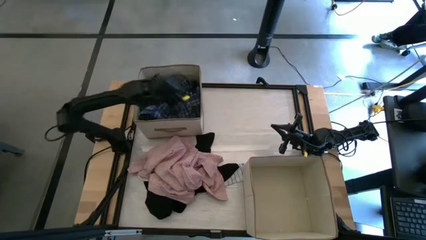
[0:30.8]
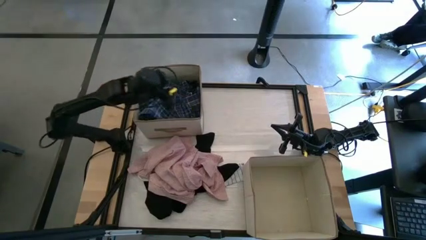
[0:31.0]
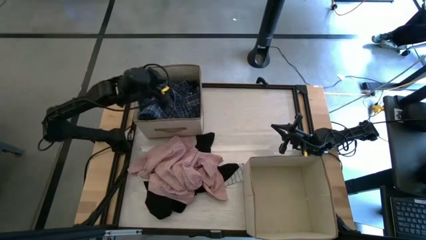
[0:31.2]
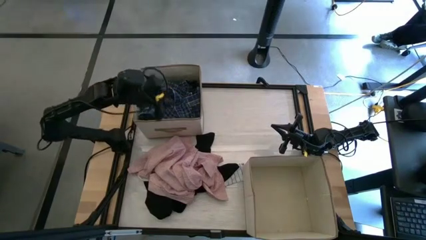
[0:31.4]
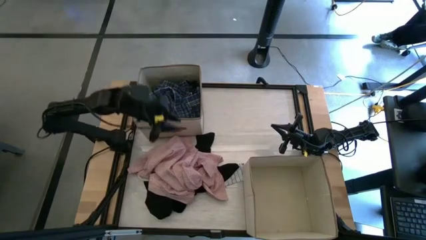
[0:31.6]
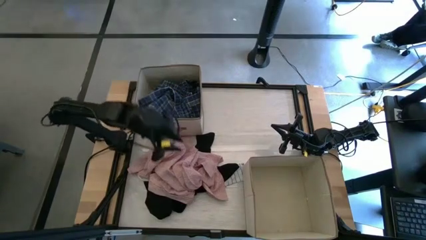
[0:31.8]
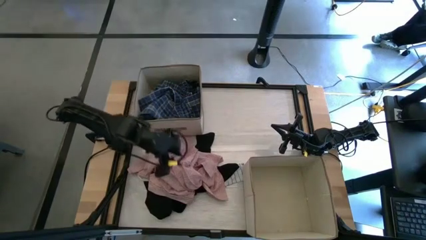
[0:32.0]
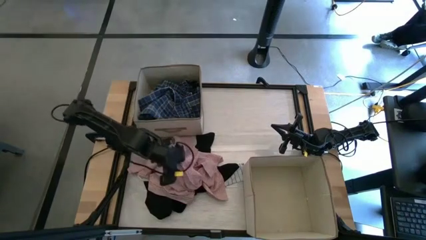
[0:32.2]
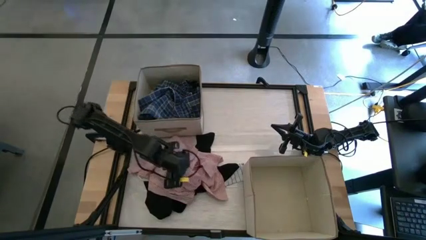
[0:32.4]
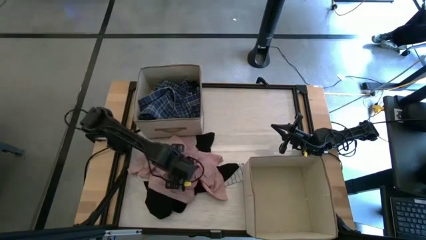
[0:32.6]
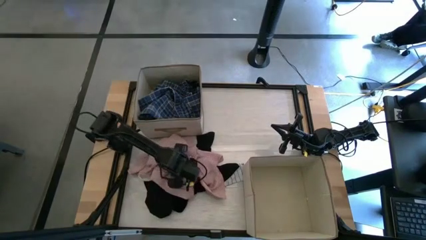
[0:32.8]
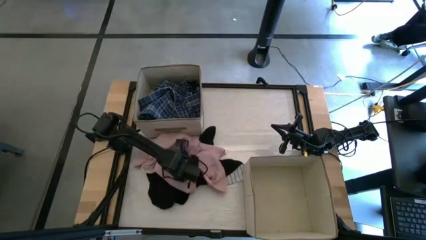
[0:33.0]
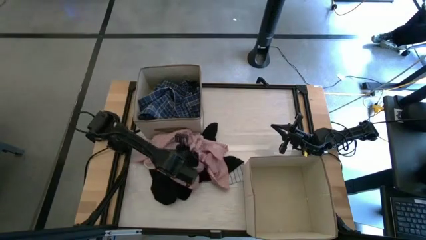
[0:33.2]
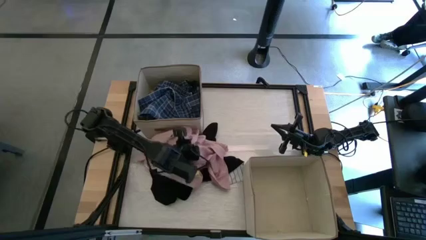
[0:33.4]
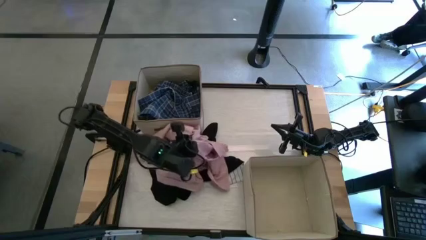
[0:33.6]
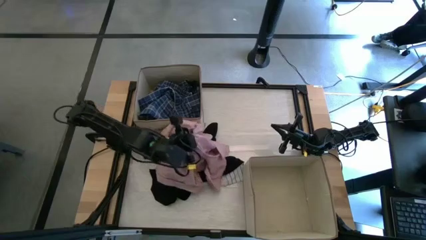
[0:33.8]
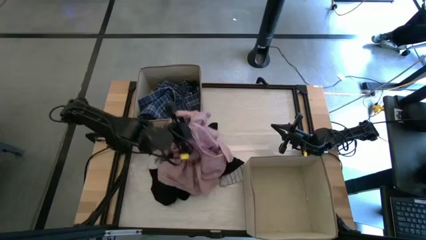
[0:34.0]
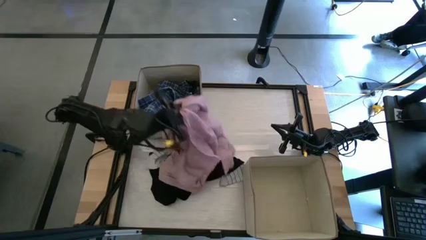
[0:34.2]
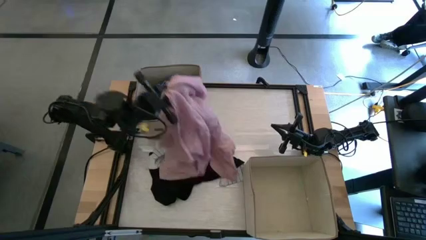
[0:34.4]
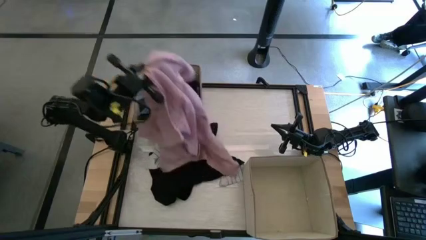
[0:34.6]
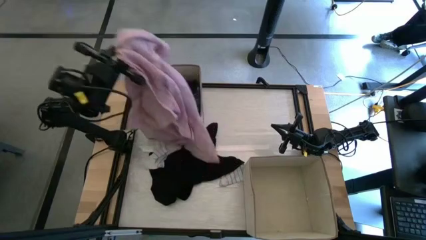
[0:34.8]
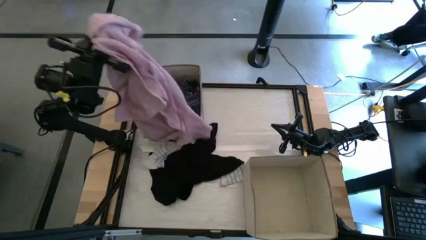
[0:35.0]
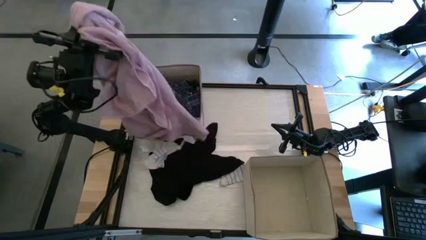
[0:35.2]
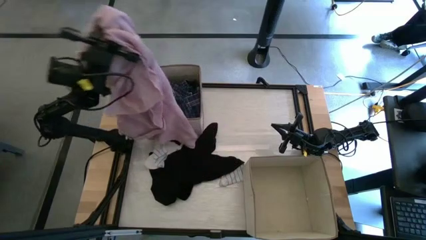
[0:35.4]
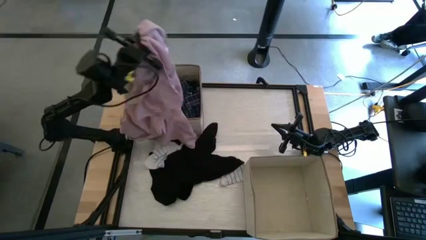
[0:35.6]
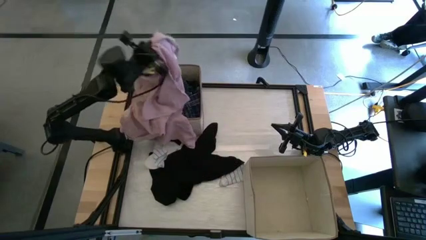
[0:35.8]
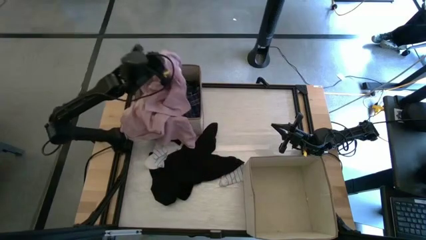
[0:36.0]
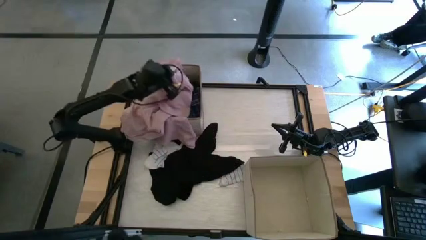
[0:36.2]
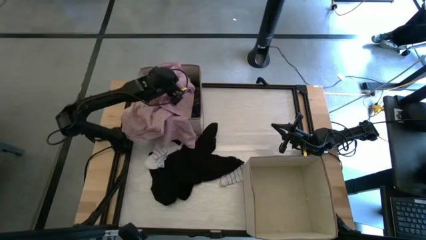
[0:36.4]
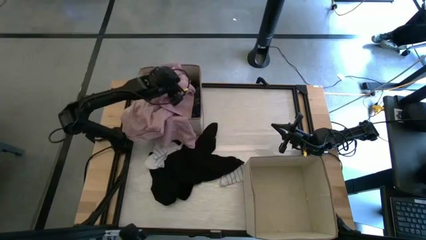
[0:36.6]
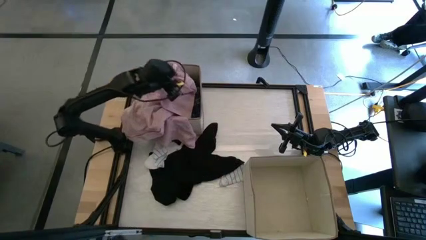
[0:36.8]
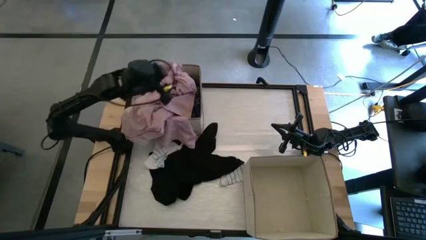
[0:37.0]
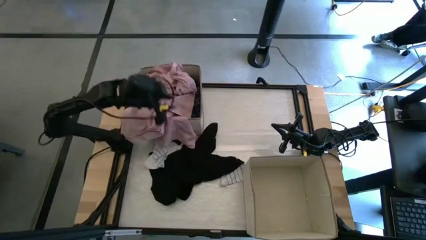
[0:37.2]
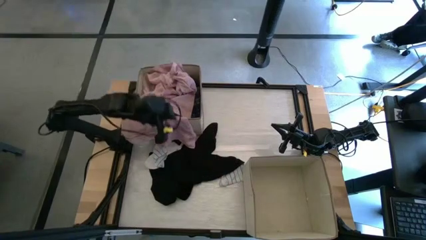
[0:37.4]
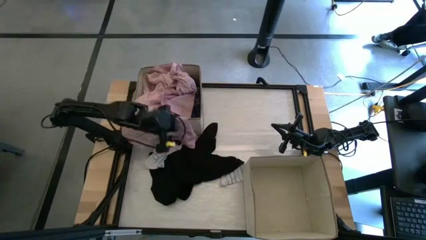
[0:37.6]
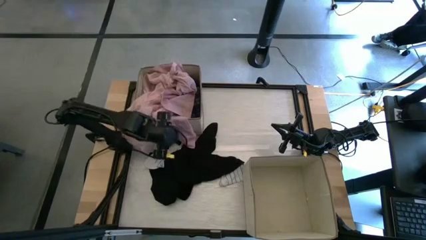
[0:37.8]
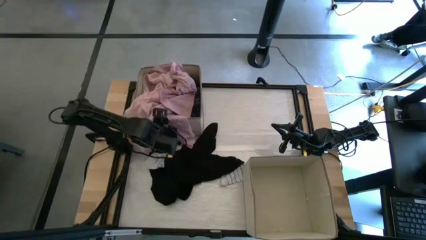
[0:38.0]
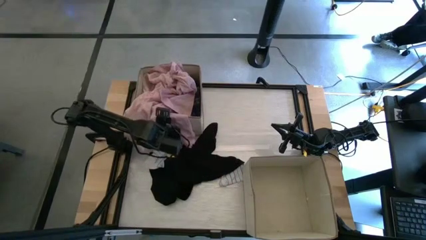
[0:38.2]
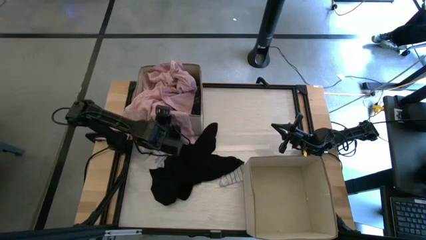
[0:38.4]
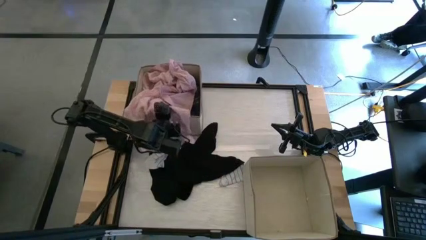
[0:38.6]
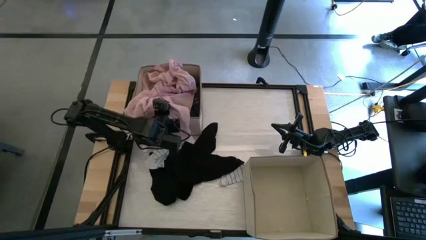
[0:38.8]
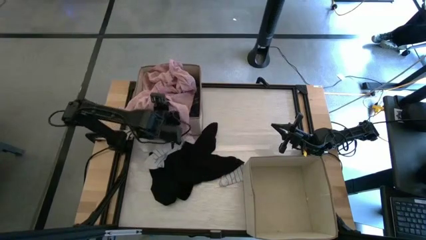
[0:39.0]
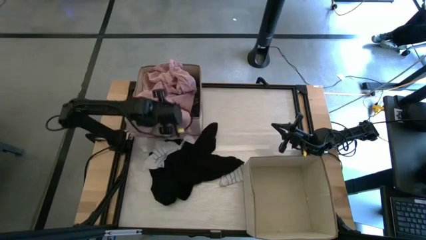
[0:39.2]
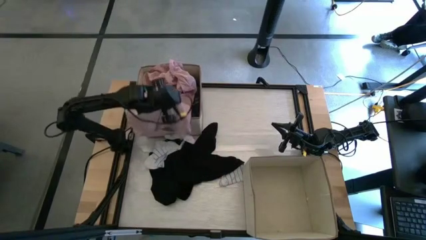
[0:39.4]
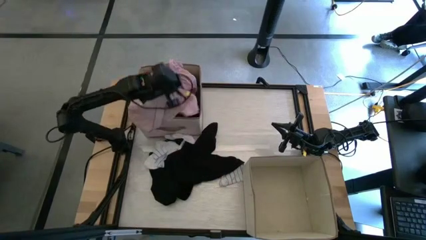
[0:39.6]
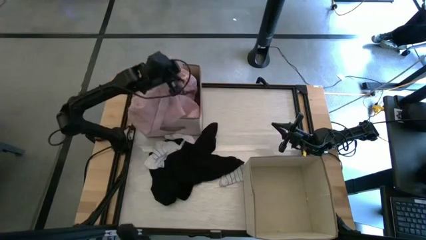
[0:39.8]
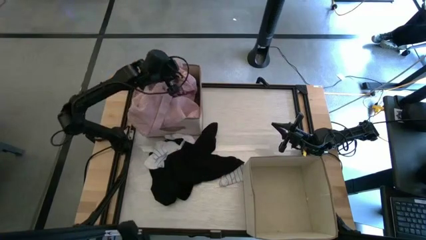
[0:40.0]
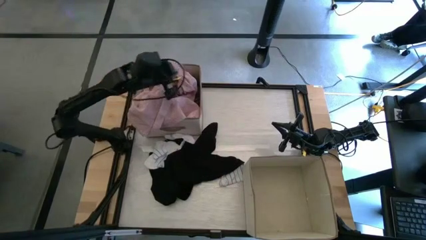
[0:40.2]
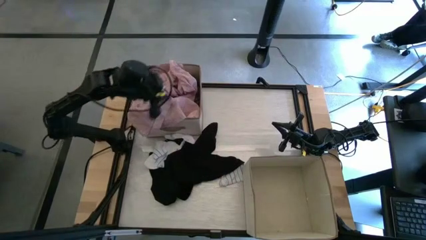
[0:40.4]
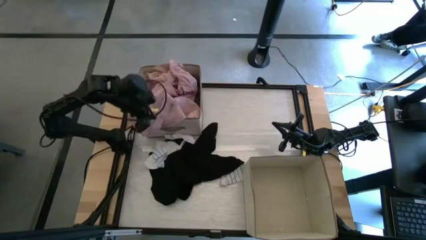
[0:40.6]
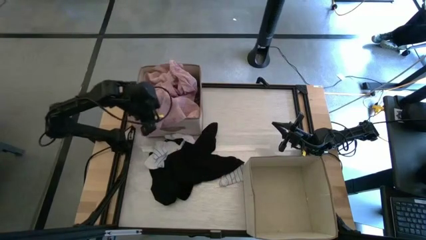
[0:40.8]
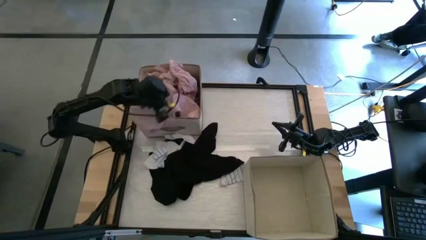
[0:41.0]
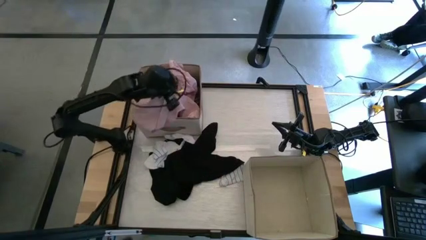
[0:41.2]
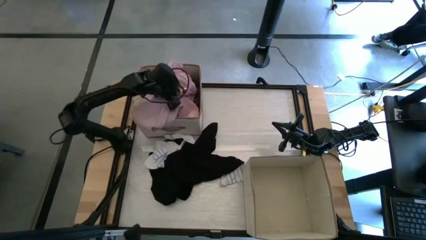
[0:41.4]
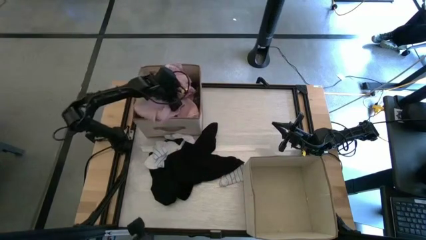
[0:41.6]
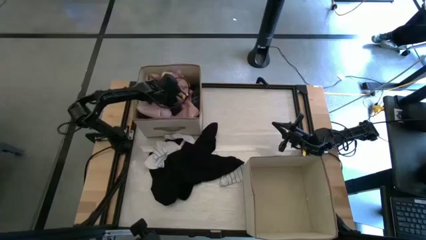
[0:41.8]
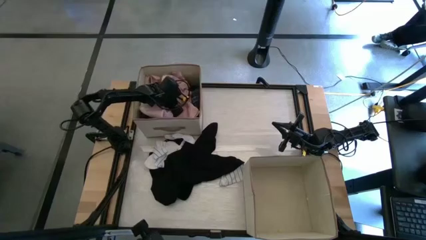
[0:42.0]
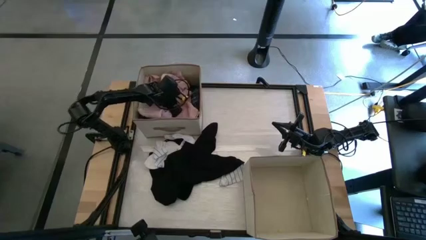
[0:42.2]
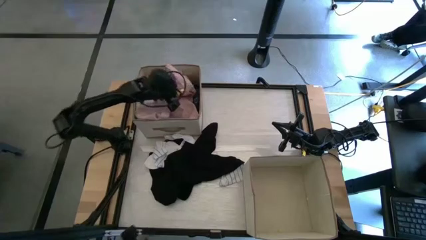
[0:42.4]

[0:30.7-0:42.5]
Task: Sort clothes
Put the pink sleepwear into the top white laundry organizer

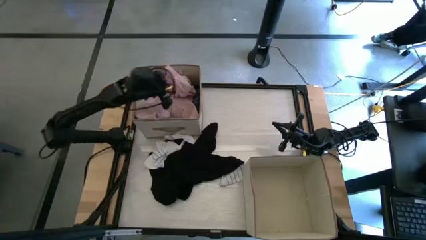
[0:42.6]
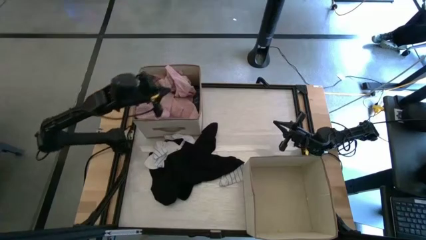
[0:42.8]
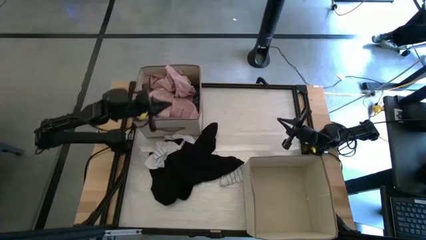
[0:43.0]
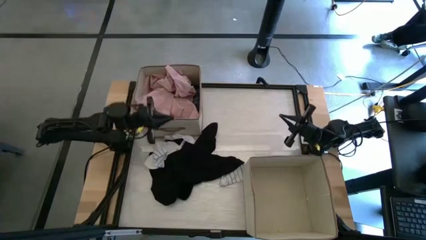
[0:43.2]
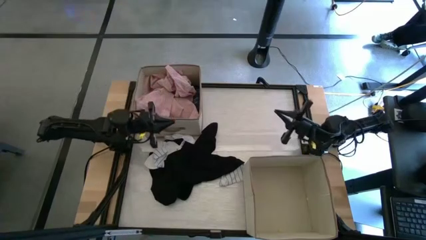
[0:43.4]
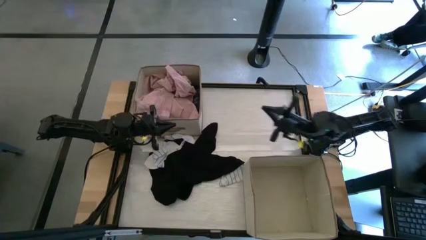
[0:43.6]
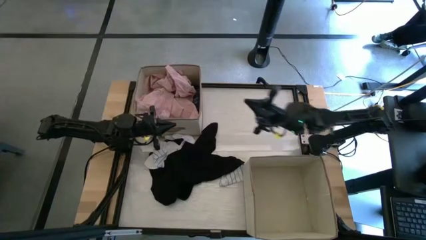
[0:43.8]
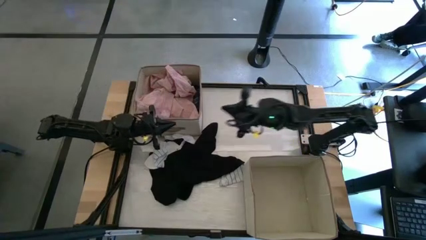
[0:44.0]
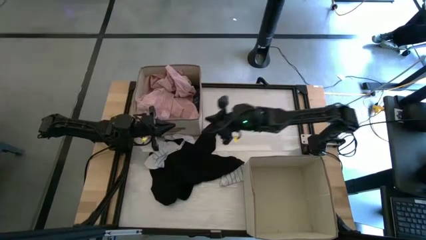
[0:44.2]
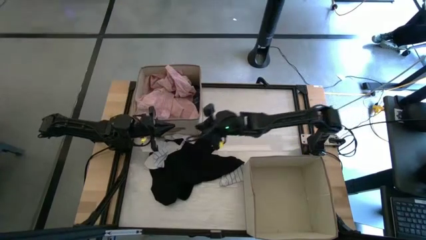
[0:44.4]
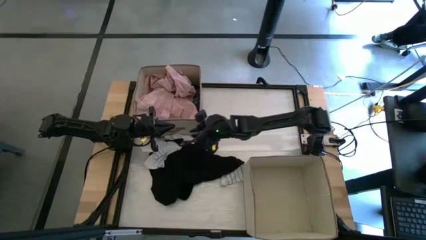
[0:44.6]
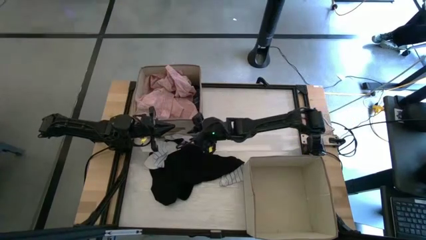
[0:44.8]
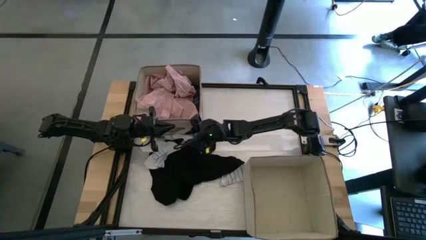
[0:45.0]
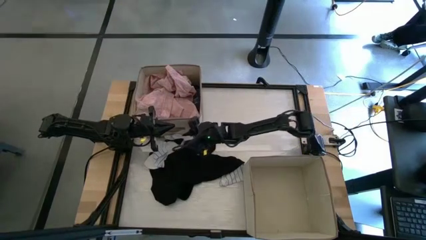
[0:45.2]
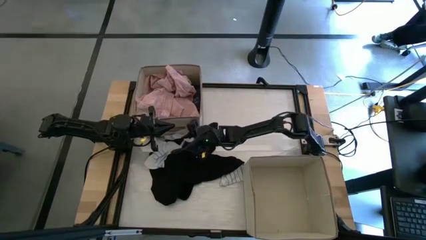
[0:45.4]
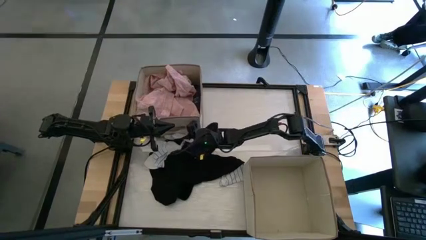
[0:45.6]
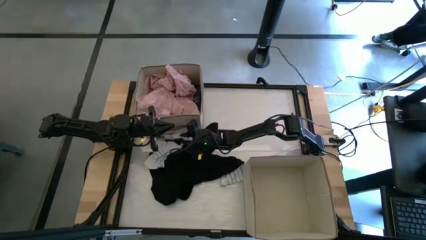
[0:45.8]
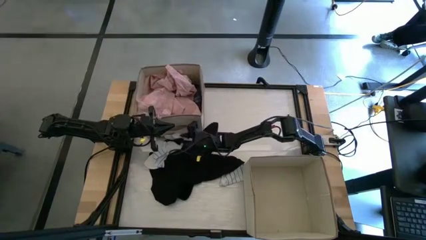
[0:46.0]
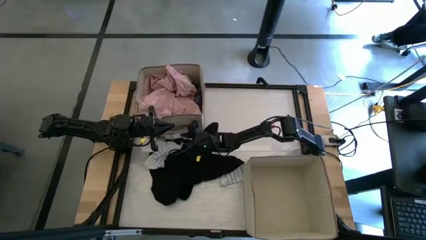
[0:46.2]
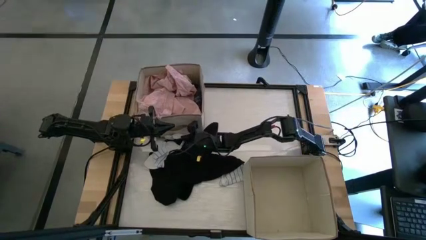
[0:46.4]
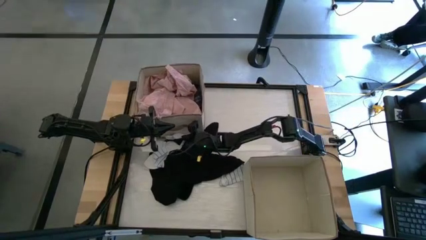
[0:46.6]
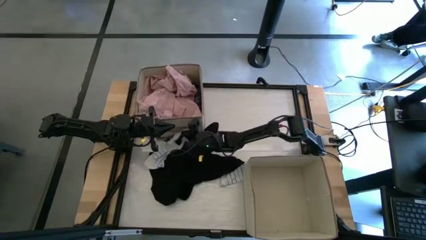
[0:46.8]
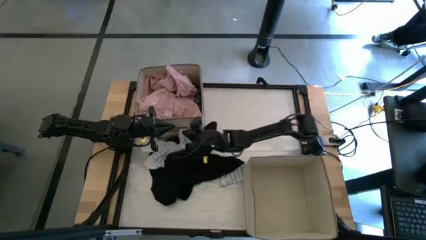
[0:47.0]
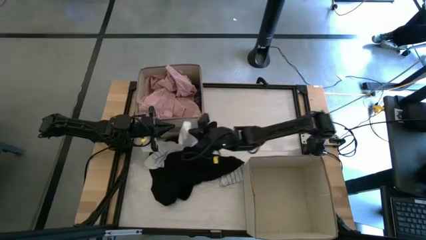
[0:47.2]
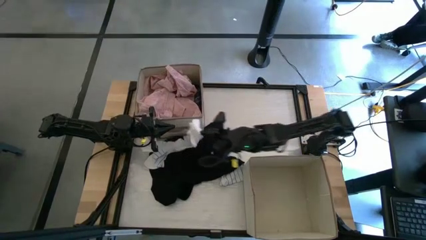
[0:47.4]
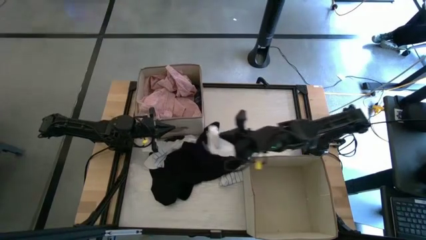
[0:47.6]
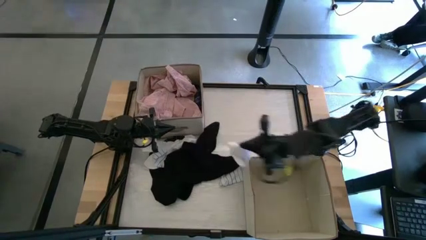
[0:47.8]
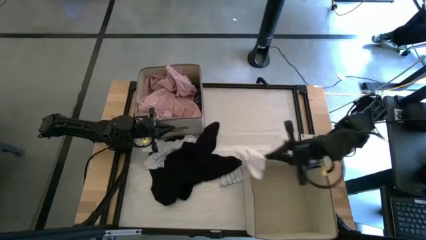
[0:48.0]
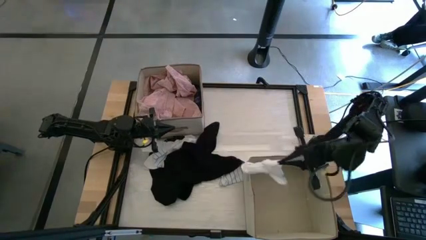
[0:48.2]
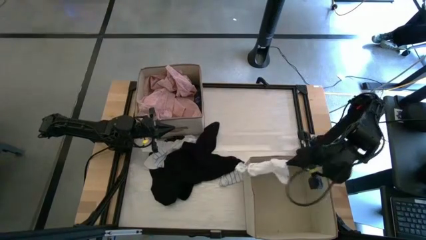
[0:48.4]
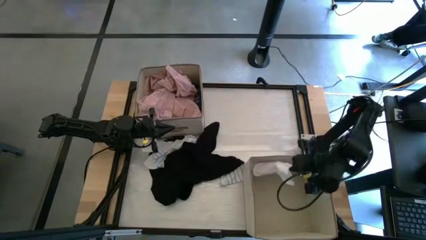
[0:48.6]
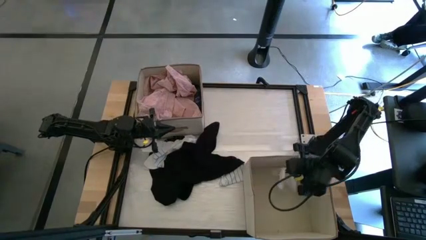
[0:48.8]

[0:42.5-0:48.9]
Put the white sock into the bottom white laundry organizer
